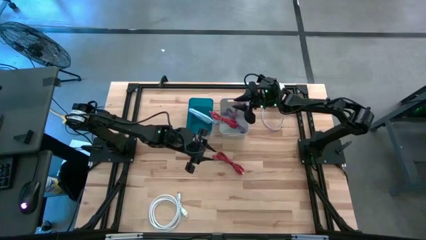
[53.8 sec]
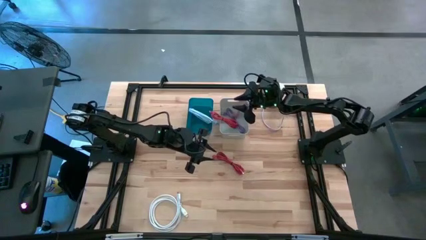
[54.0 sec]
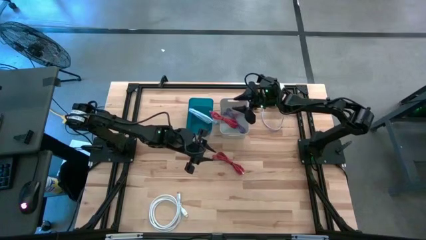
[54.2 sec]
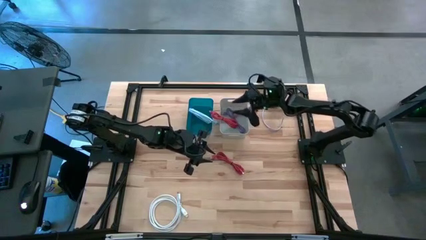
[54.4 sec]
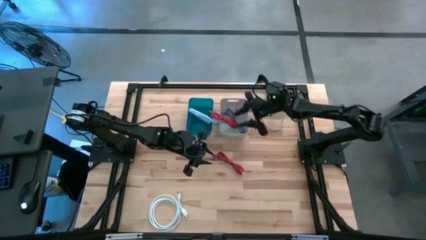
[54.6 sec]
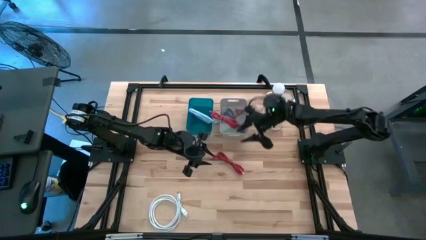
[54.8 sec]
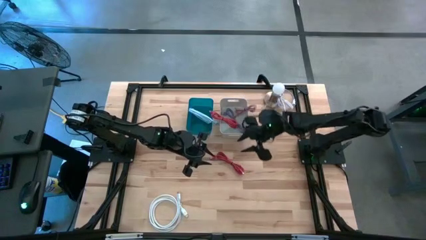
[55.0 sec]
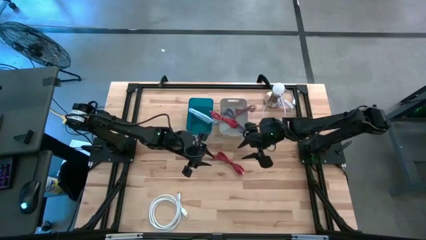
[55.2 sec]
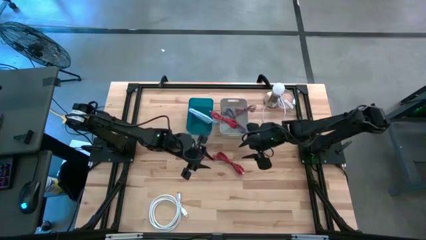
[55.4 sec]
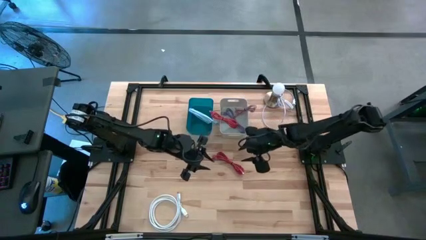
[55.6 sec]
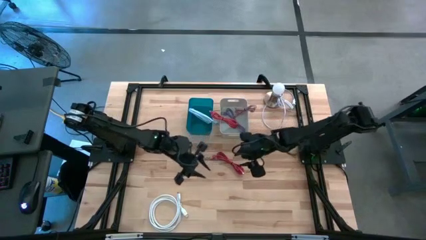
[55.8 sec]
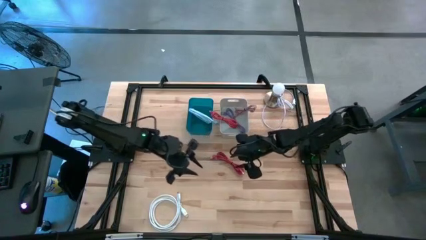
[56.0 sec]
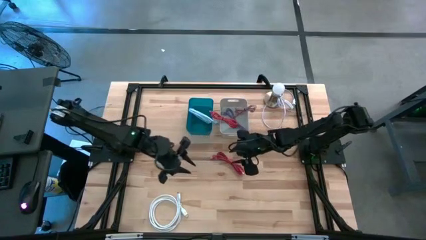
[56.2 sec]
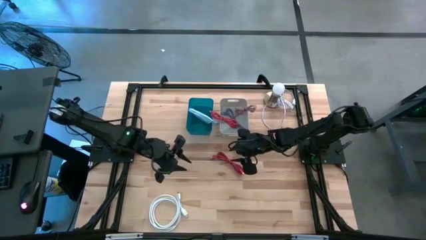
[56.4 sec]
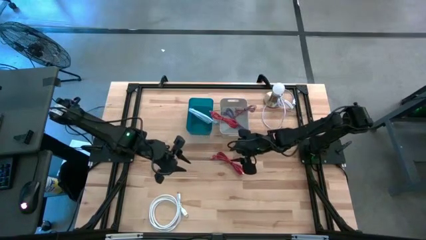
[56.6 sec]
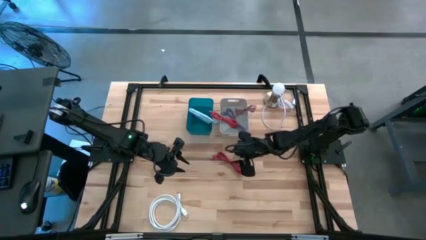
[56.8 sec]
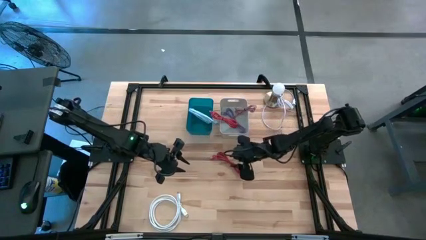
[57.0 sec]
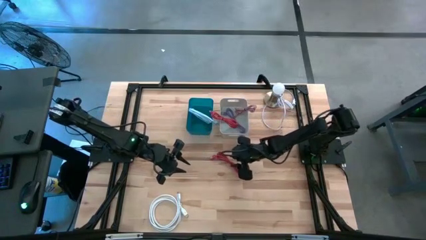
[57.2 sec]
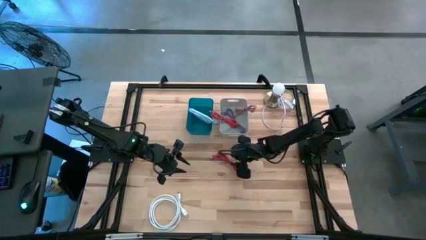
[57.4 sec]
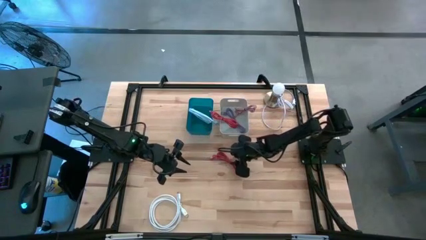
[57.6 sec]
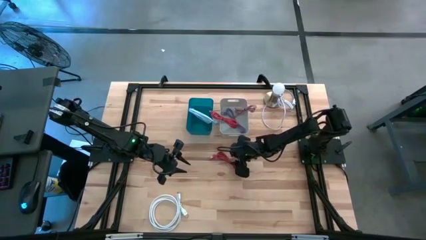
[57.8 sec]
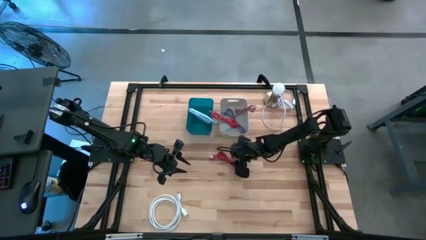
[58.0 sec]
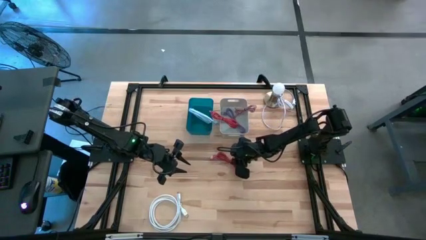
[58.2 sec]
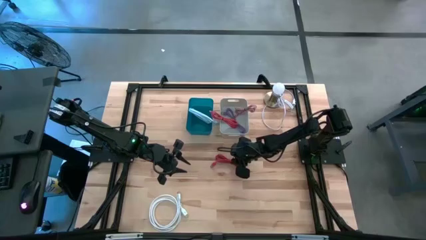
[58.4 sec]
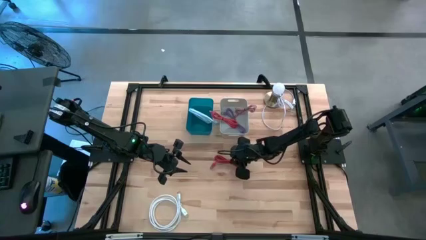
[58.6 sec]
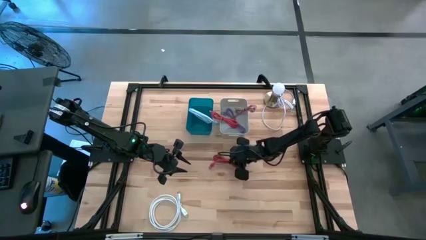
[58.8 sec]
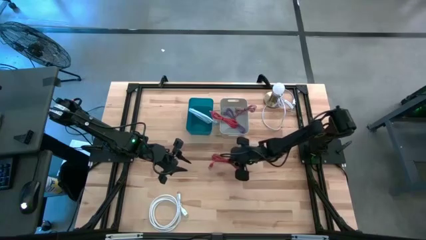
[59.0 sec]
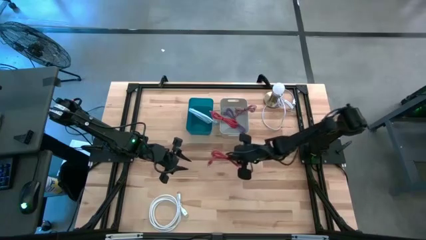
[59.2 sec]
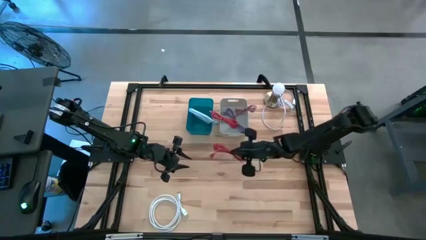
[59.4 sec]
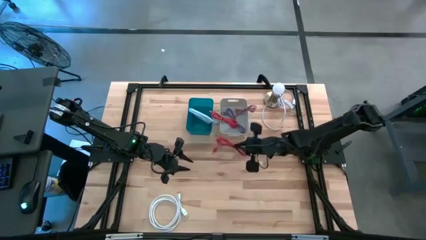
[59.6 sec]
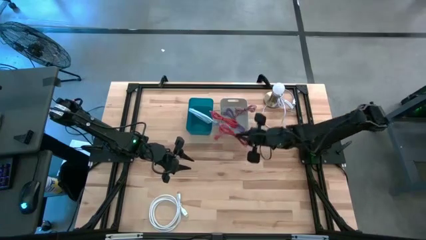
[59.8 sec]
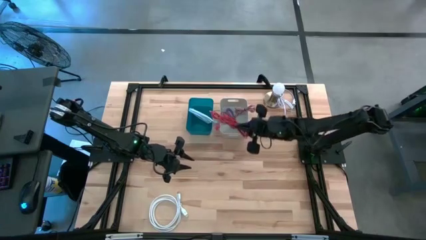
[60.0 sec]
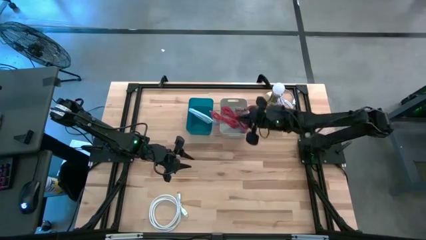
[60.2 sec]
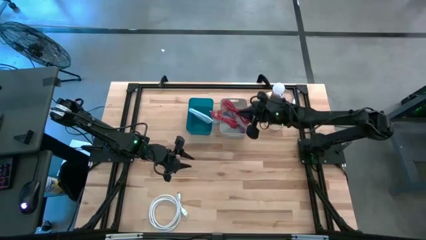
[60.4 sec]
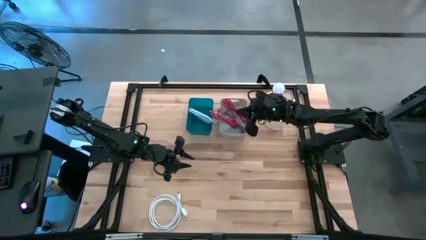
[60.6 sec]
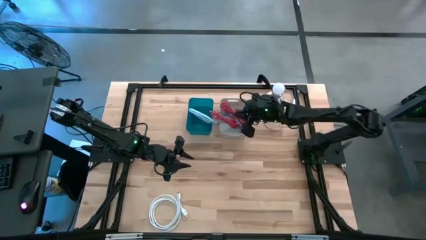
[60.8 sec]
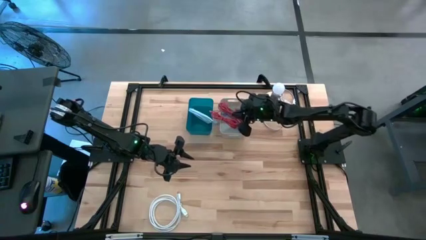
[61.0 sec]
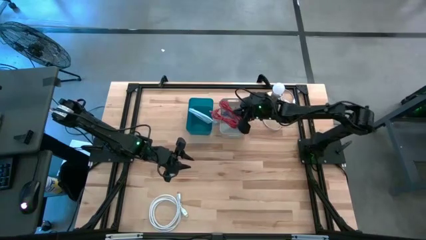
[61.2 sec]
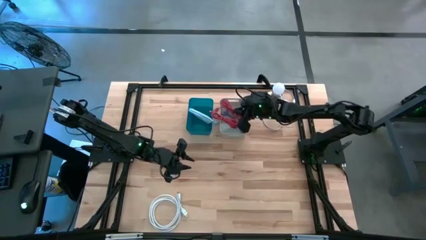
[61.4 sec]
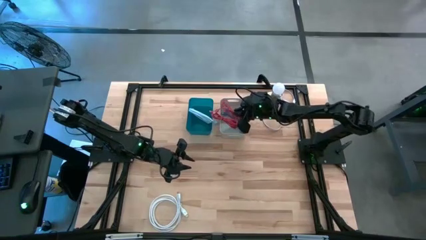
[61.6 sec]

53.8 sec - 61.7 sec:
Task: Pick & Place USB Port
Put the red charger cable into the white bin

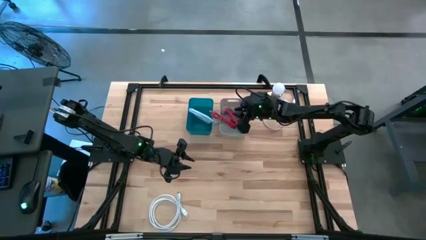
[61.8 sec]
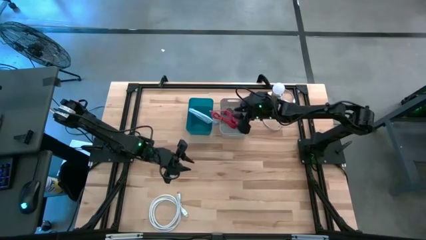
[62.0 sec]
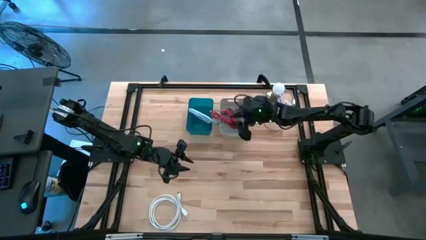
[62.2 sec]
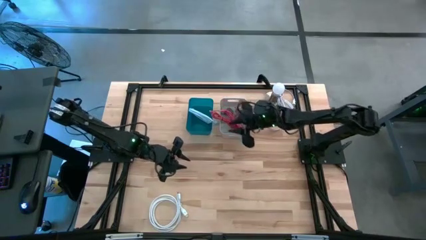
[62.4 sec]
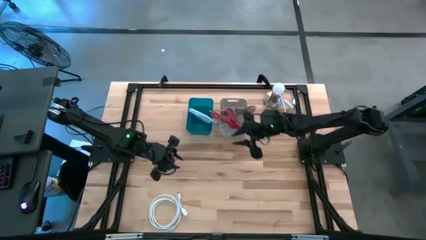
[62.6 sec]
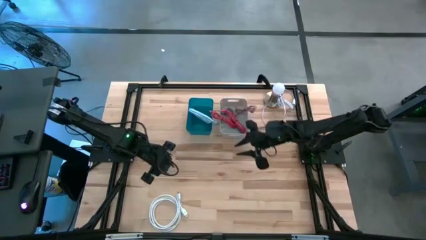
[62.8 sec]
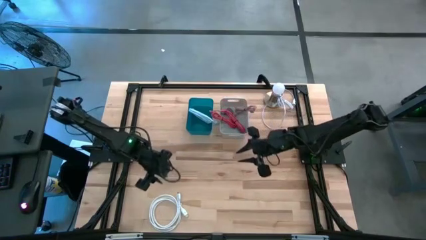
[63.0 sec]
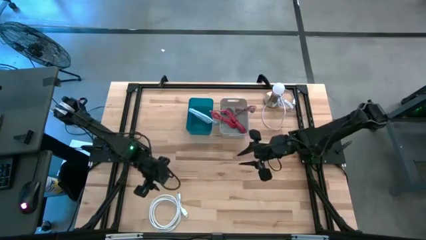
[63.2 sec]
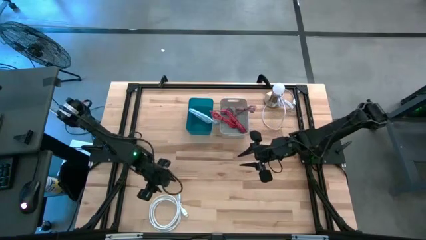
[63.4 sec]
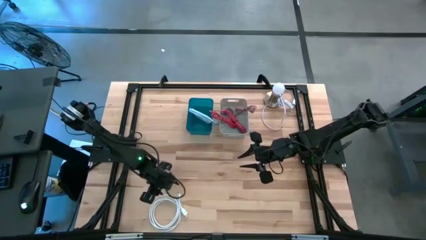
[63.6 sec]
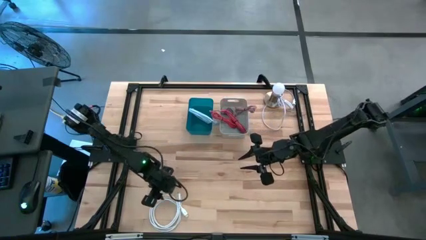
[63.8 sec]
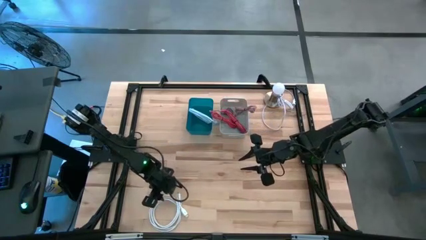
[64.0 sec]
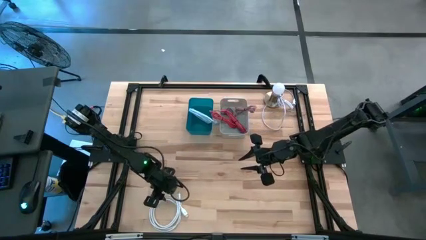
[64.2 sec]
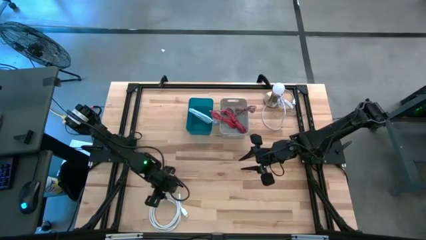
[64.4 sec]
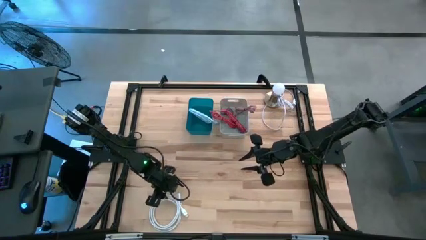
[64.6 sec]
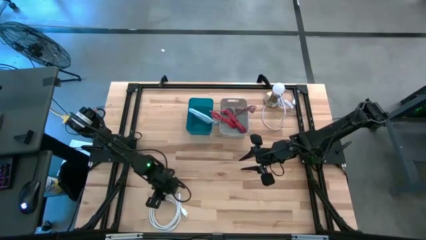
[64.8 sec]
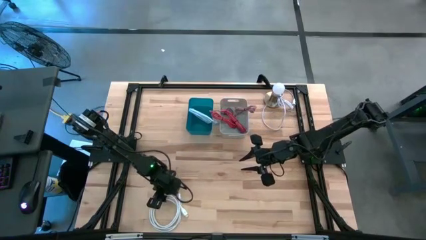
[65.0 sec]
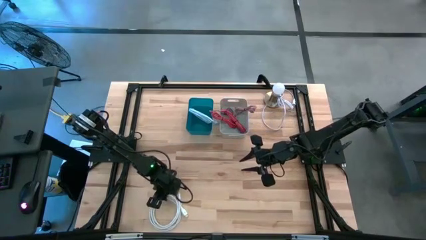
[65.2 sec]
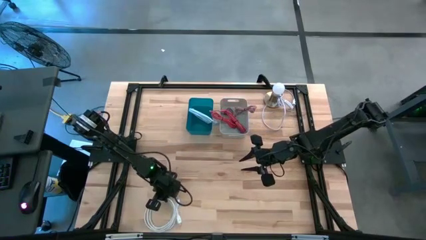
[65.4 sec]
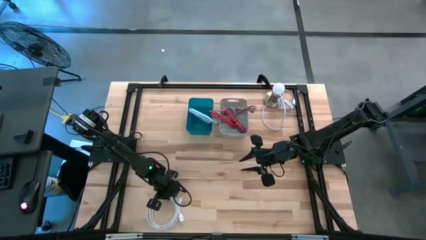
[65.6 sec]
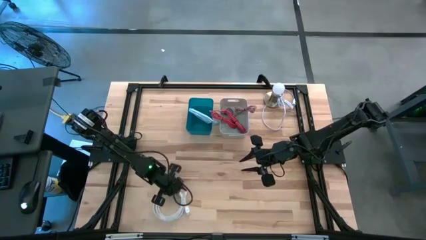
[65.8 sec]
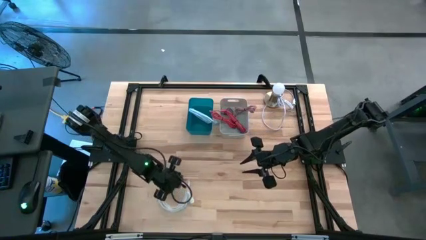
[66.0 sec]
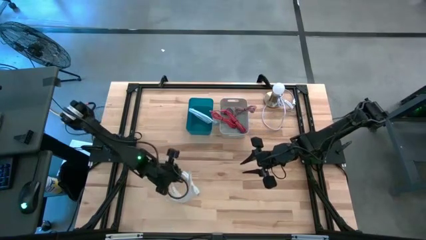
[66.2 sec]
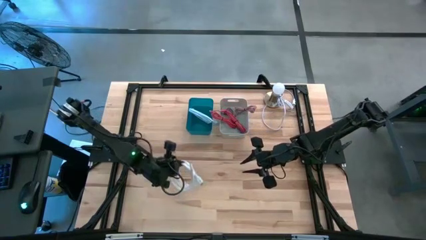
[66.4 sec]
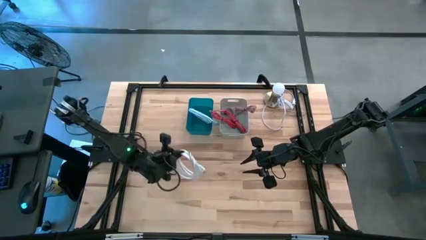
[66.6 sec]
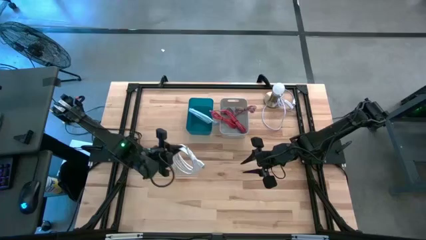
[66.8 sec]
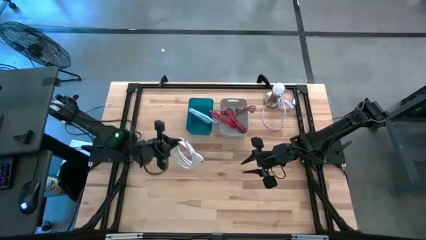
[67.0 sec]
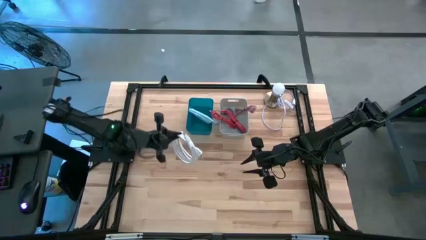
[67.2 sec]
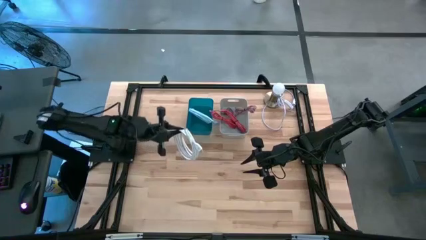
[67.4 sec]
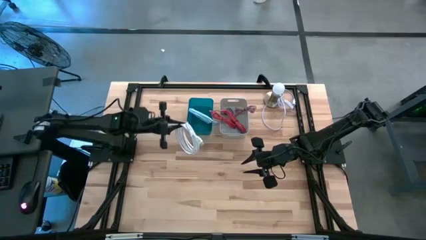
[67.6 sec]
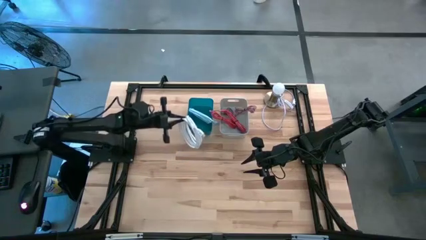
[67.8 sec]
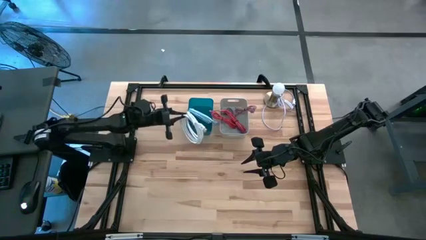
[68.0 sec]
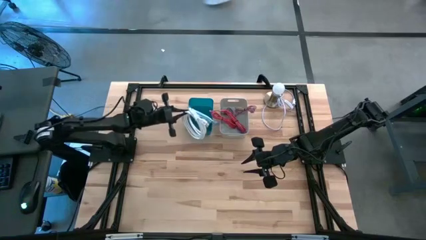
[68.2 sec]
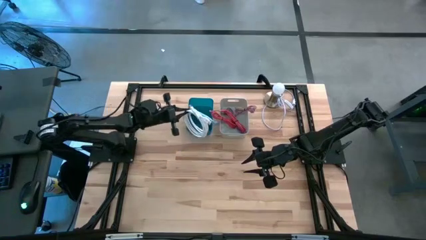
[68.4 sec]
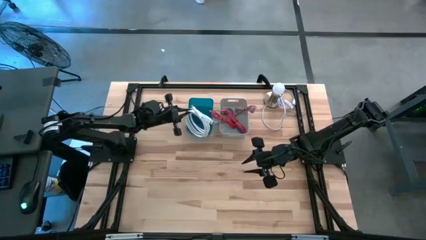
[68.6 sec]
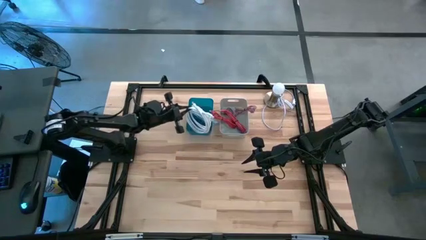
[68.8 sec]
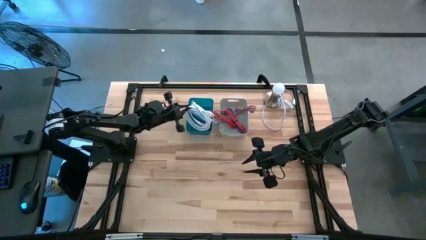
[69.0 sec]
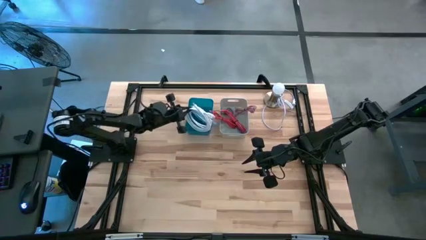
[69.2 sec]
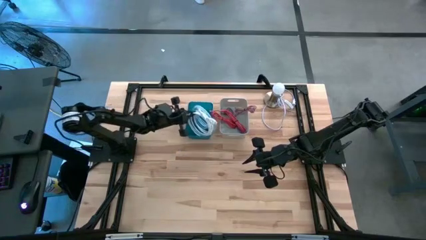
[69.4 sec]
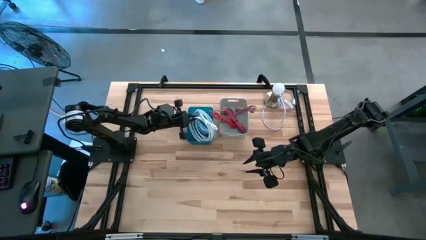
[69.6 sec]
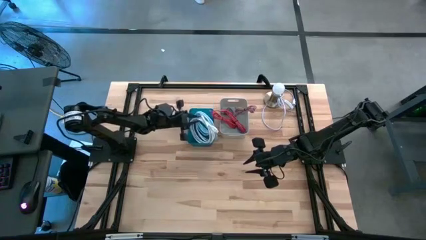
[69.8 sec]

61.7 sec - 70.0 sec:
Put the white HDMI cable into the blue bin
